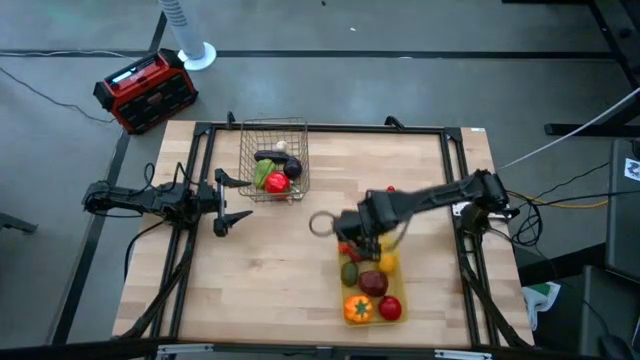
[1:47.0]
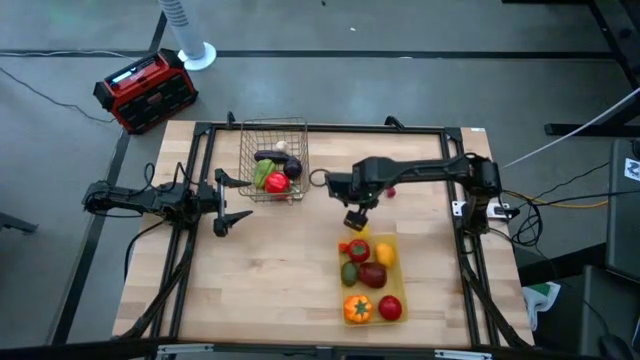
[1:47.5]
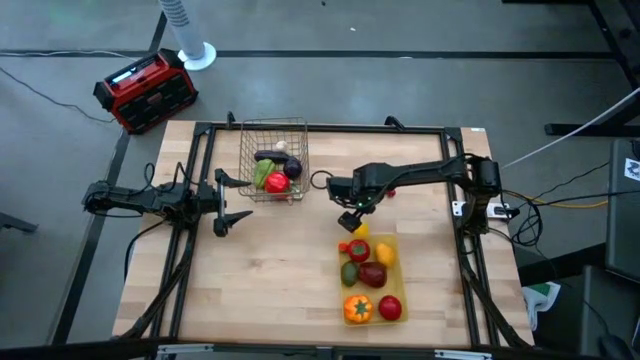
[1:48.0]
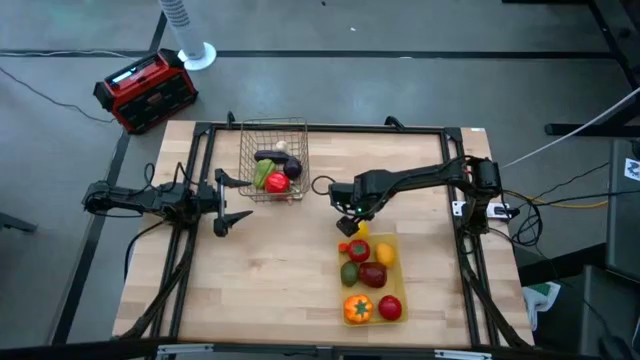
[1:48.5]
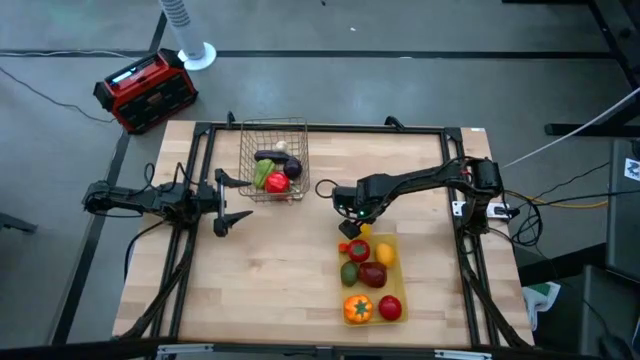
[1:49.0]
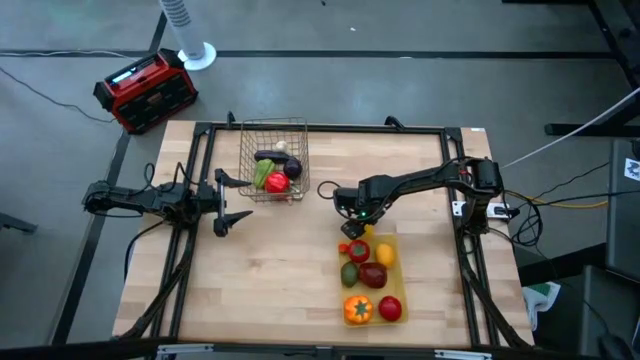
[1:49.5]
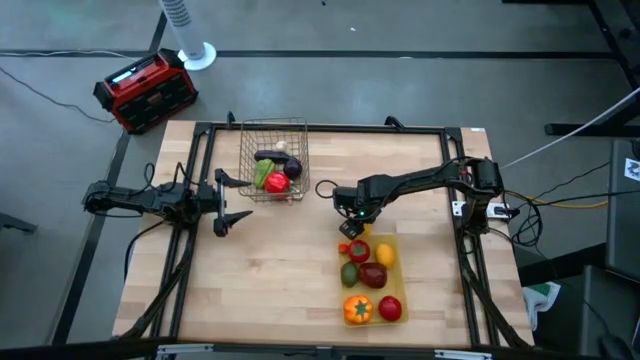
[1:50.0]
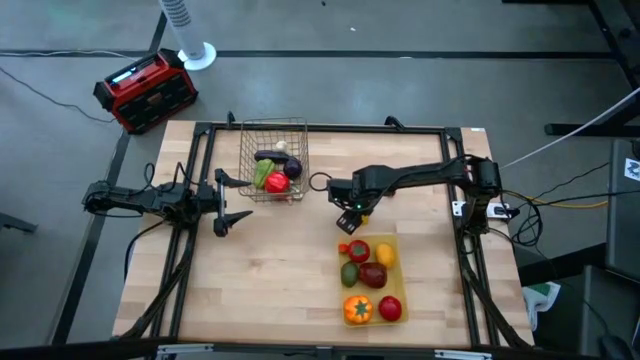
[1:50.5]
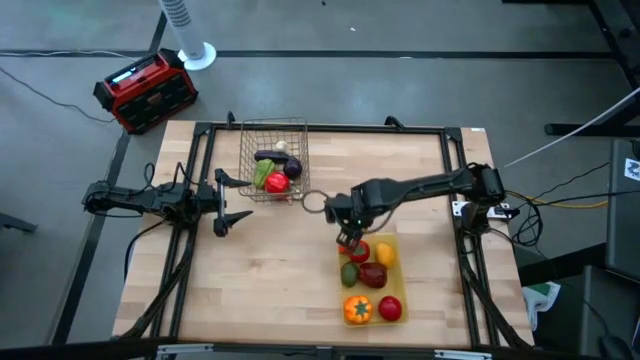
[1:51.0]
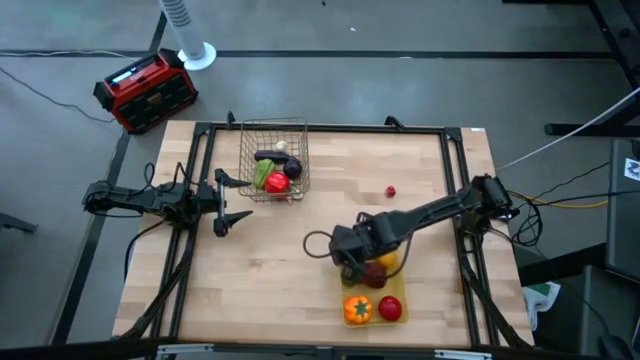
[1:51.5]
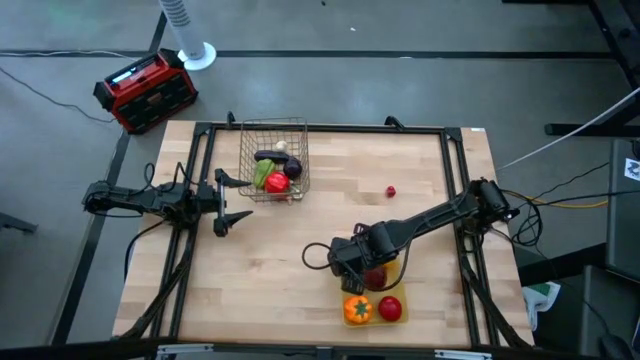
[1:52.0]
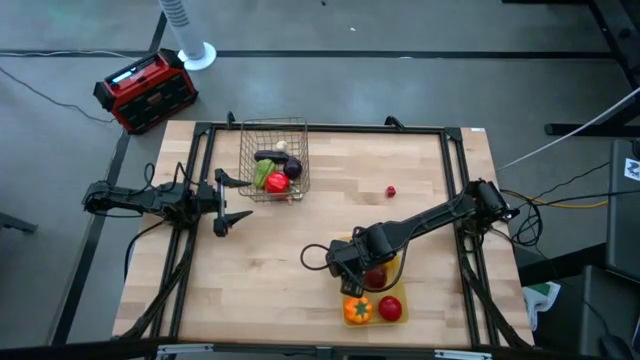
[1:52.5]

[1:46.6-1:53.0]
Task: Sort produce into baskets
Put the yellow lemon into the yellow bin

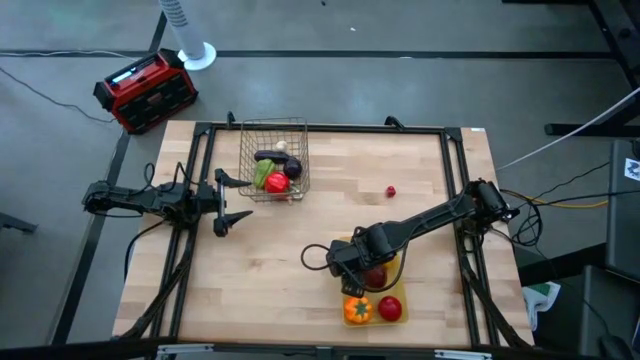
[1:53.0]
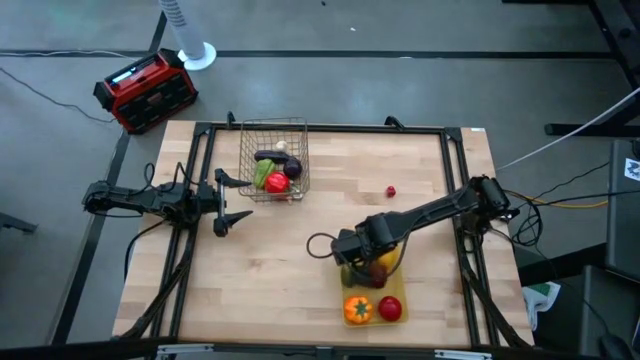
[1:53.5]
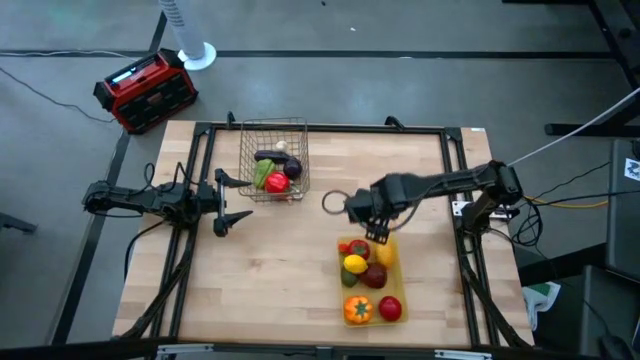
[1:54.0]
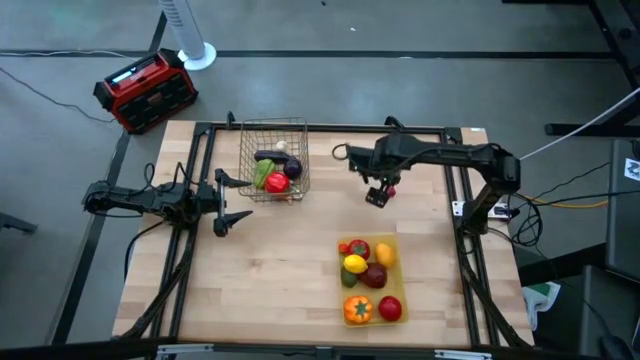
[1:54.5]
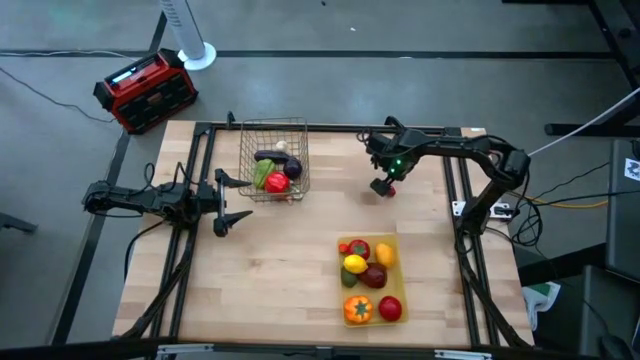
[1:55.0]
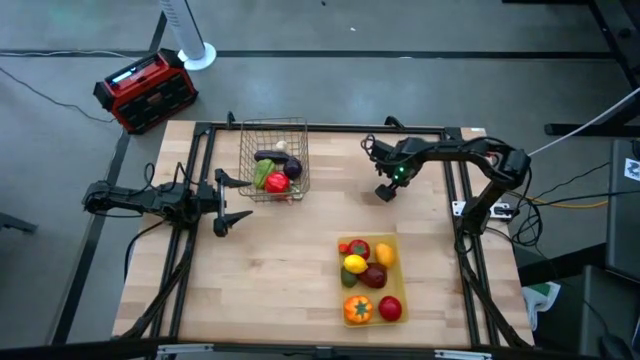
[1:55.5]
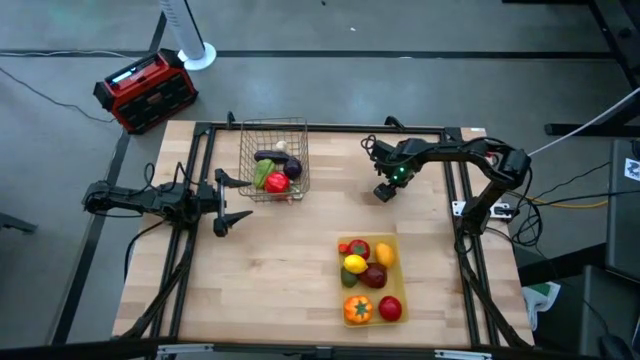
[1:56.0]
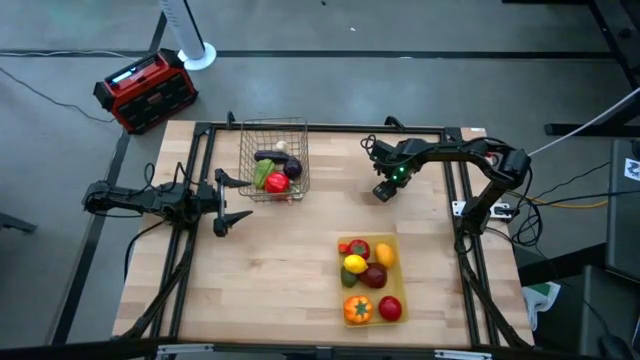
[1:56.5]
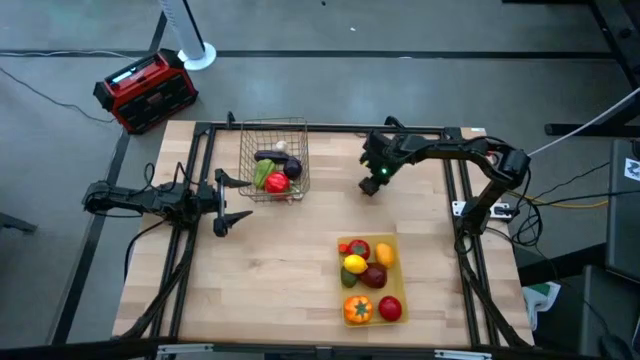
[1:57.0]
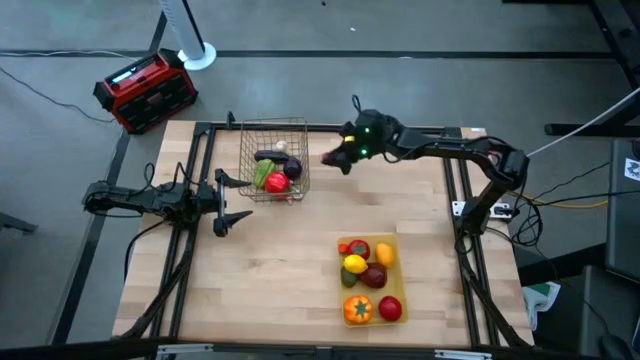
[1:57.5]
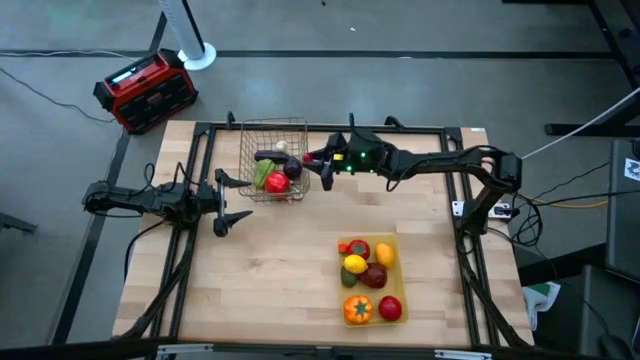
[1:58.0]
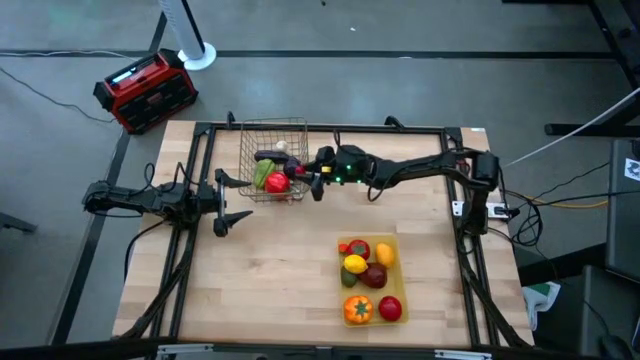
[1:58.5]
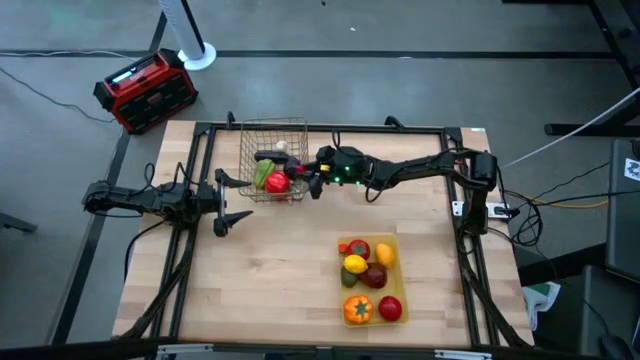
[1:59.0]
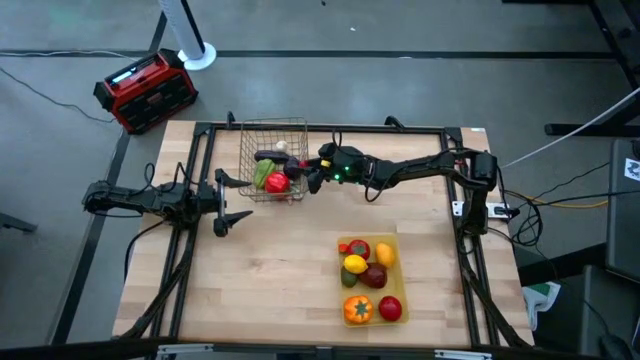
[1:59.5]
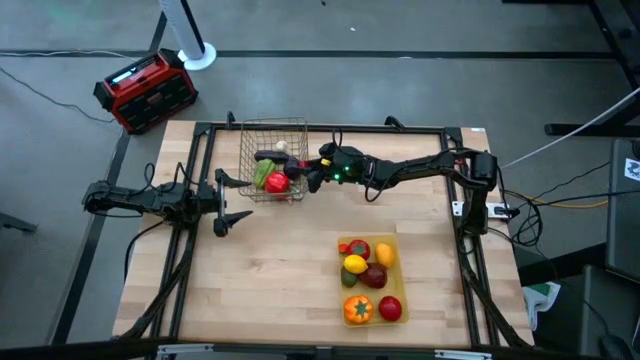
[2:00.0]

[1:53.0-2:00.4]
Put the pepper into the brown wire basket

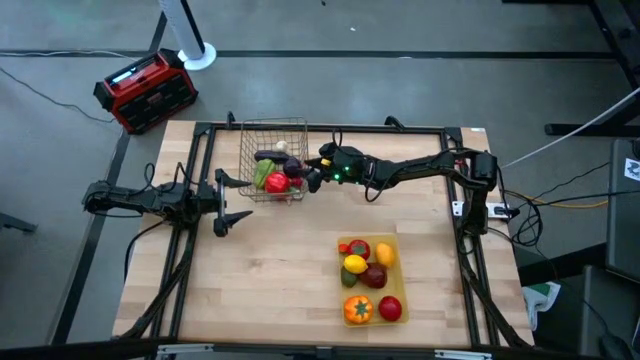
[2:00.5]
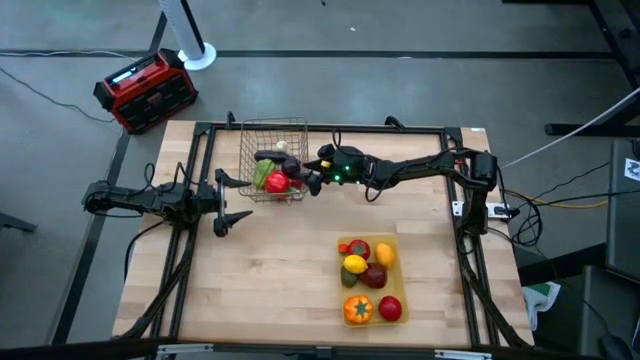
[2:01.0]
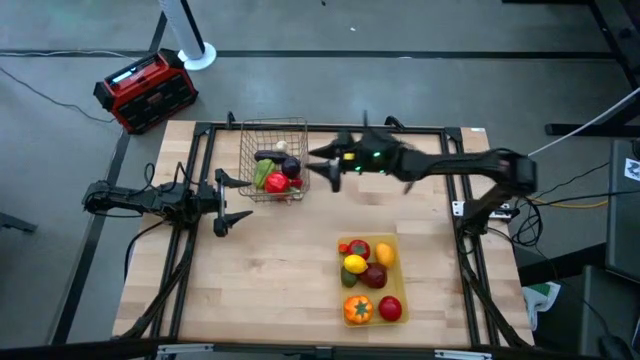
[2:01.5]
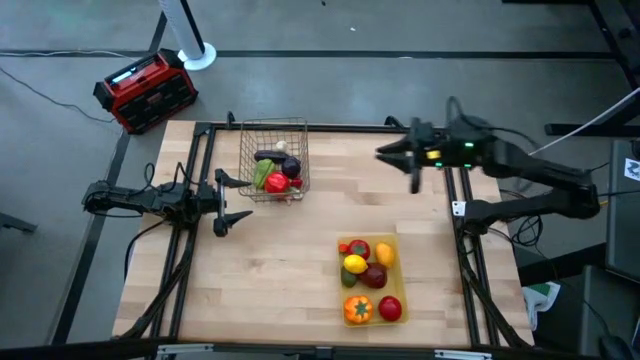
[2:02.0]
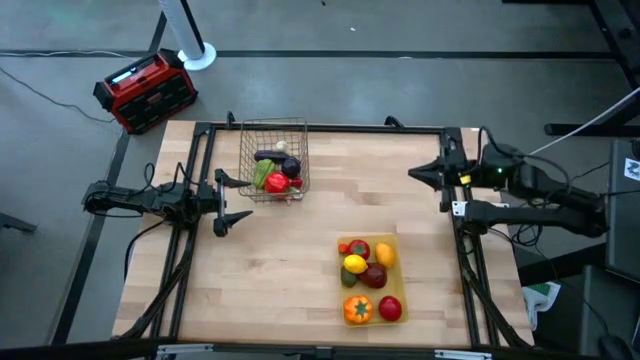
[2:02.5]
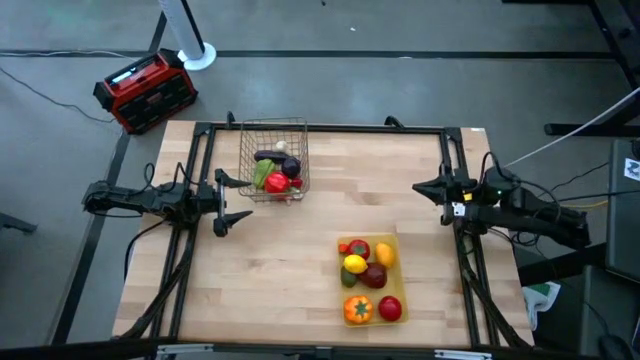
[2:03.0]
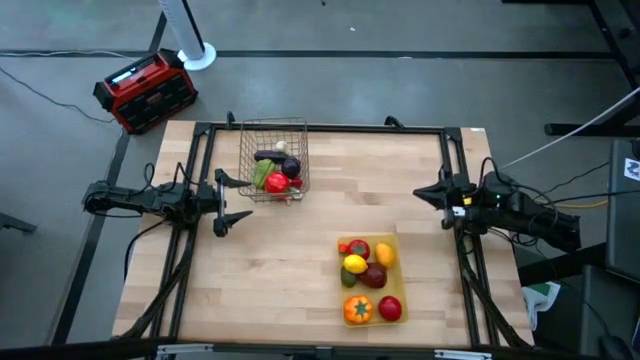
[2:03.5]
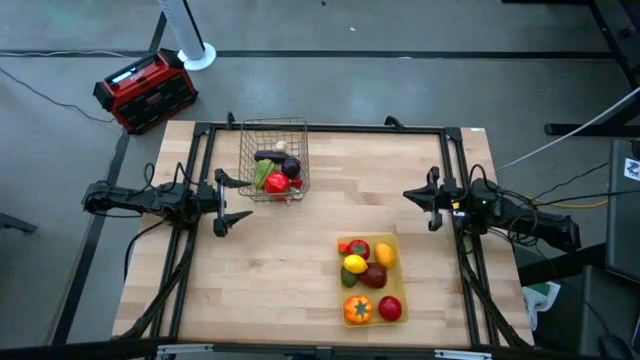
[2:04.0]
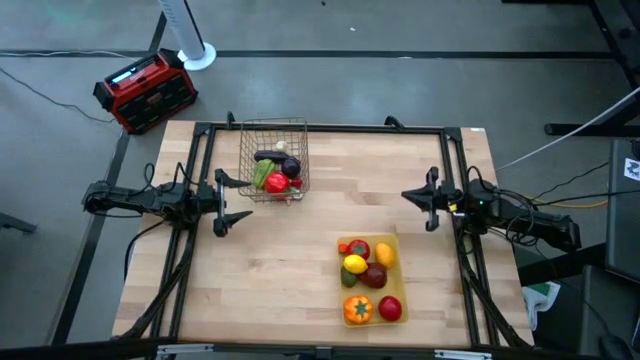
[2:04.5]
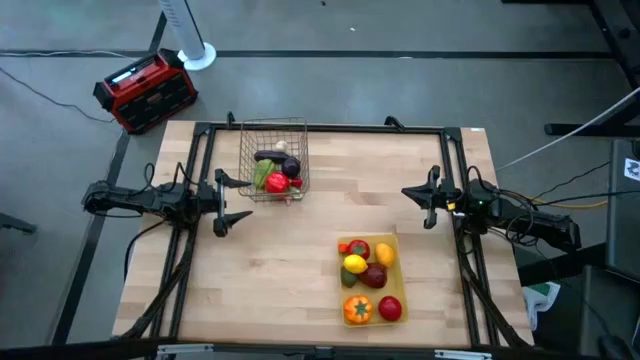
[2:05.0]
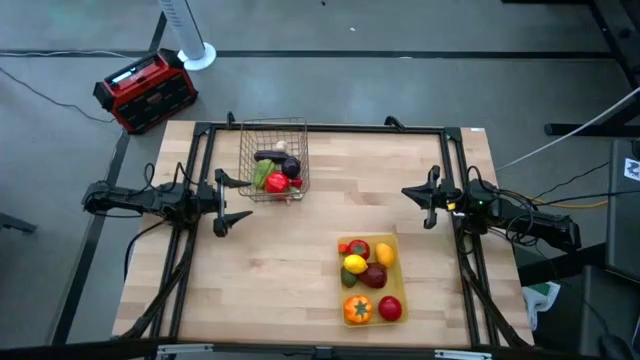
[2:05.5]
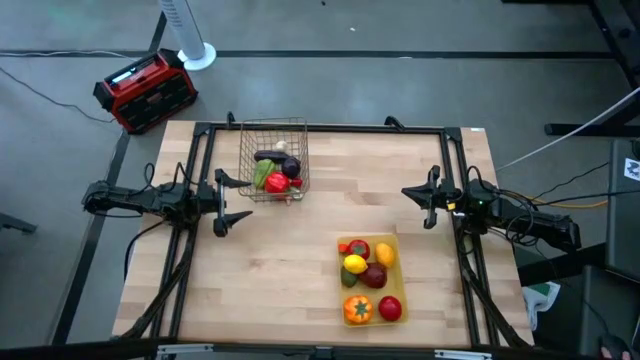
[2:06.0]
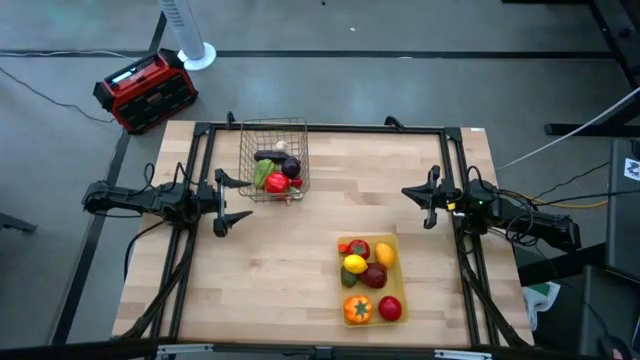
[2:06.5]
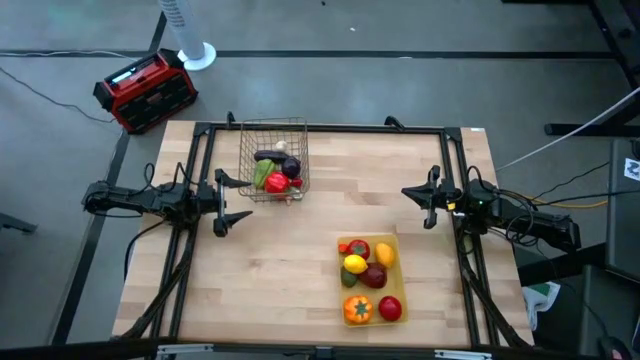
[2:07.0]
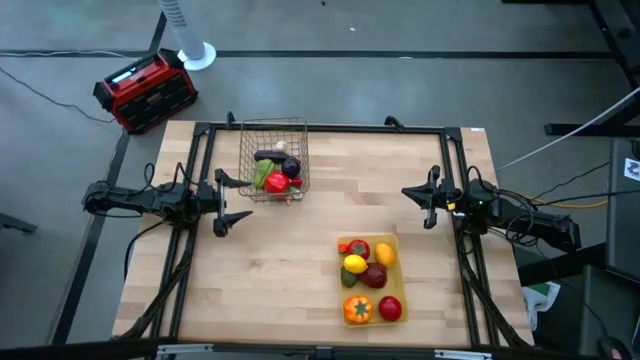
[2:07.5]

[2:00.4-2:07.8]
Return to Home Position
